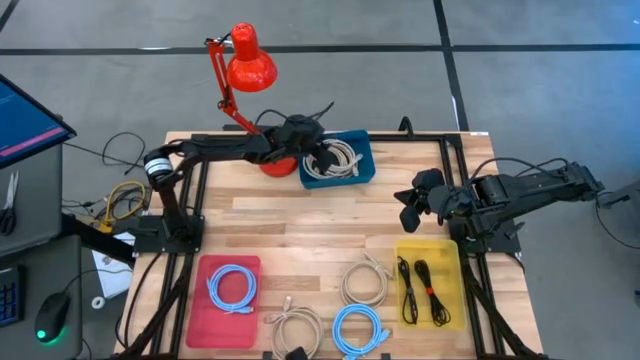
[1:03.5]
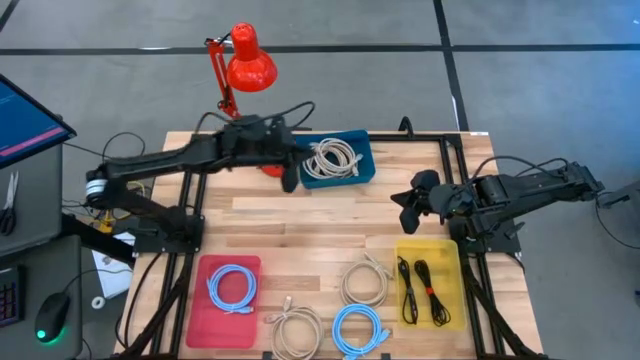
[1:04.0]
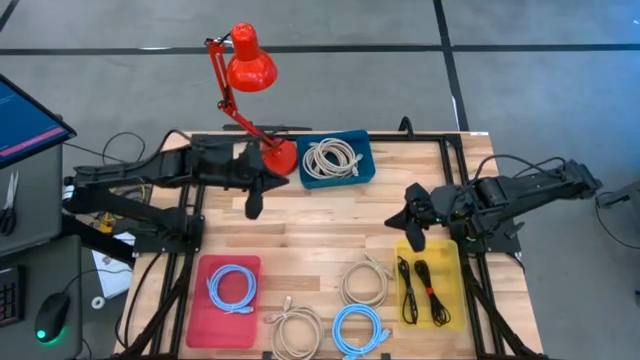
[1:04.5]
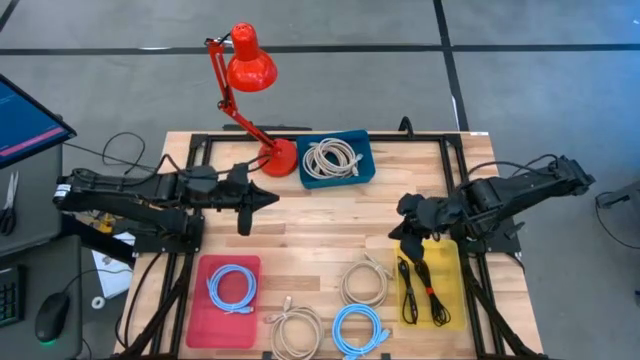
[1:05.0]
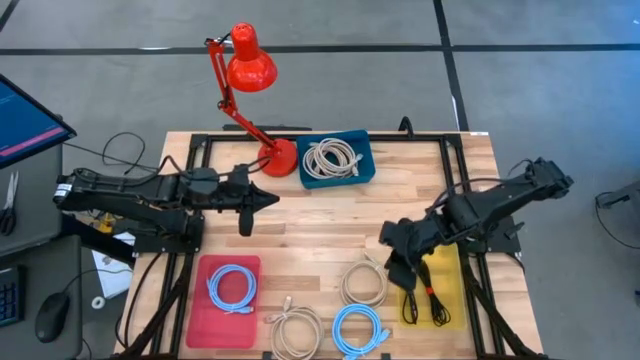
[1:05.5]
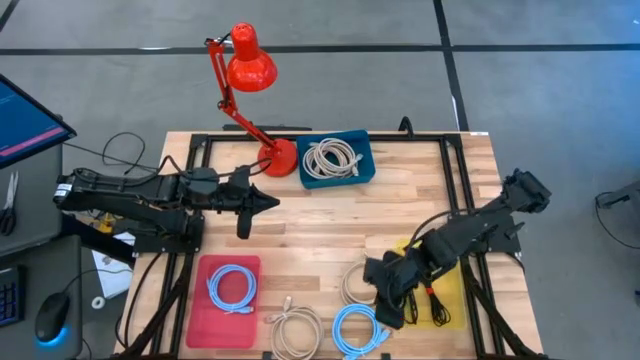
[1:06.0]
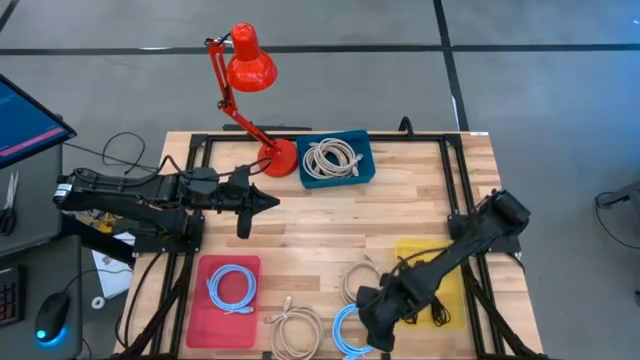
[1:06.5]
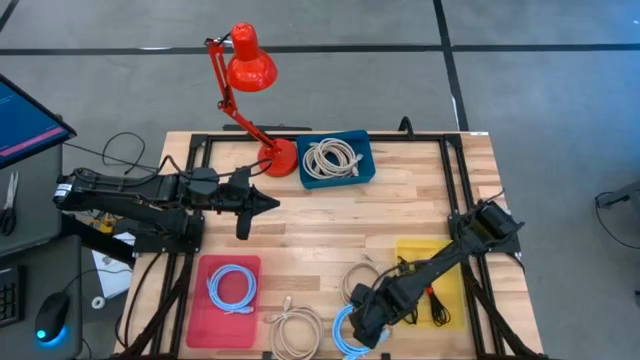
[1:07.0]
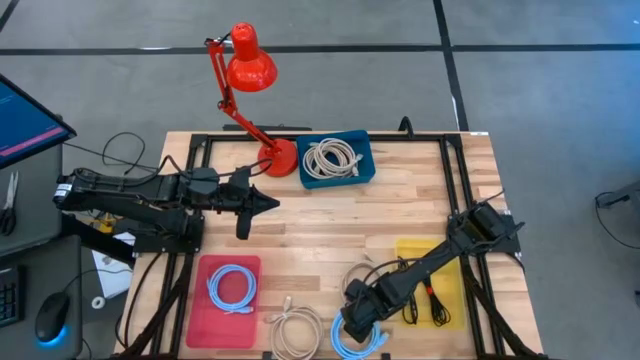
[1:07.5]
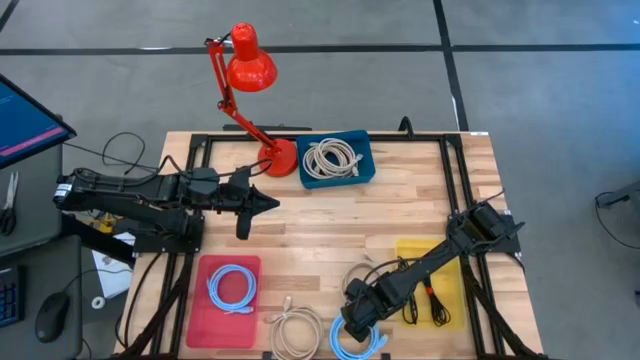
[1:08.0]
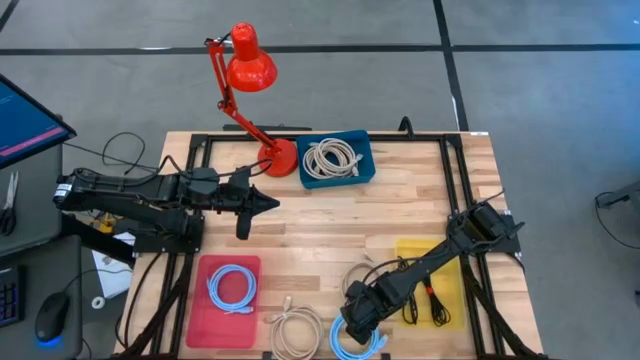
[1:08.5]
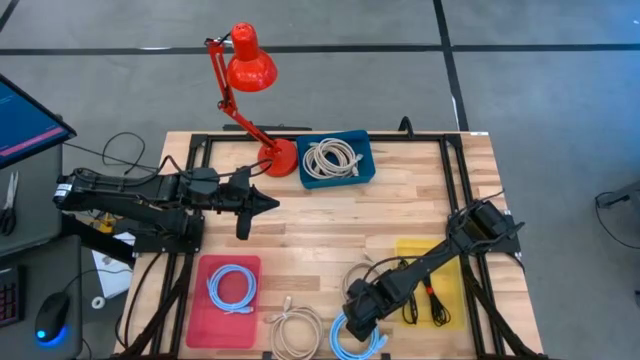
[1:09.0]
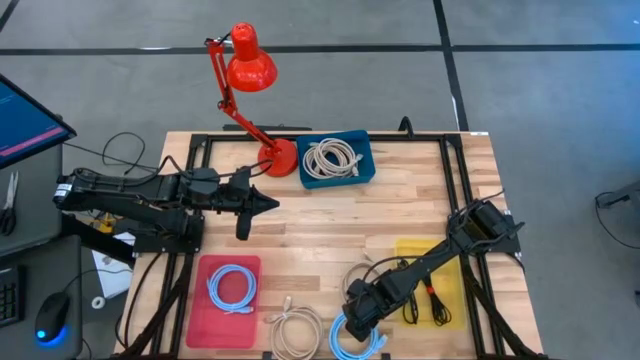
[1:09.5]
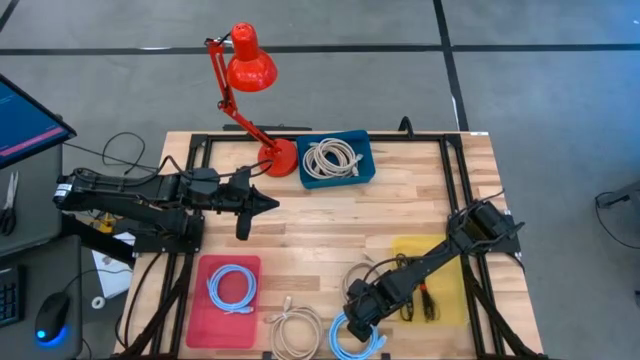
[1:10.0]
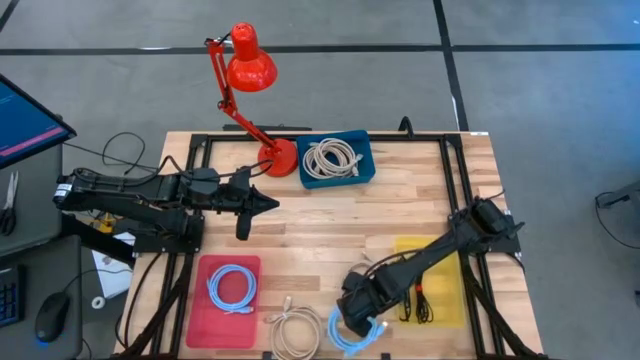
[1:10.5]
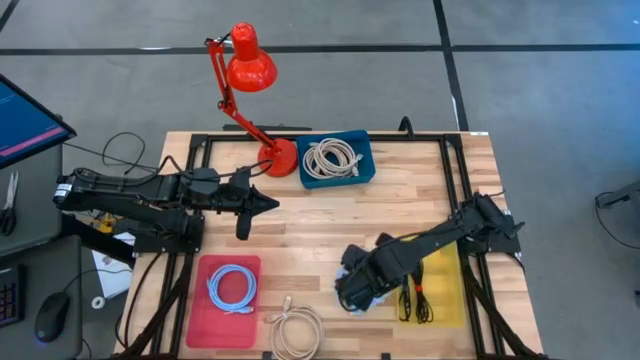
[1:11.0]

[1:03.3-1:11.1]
Task: Sort HDMI cables
Put the blue HDMI cable into the red bin

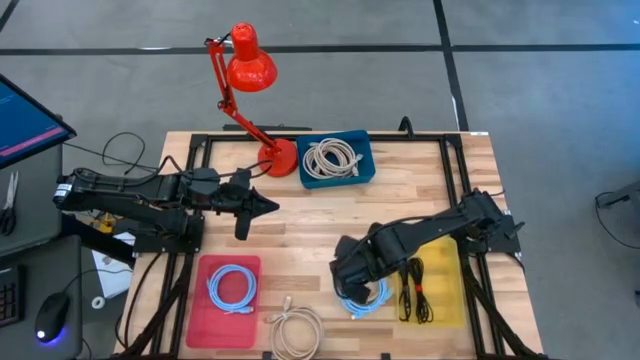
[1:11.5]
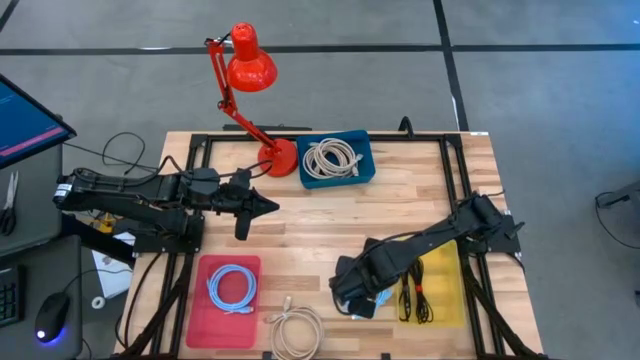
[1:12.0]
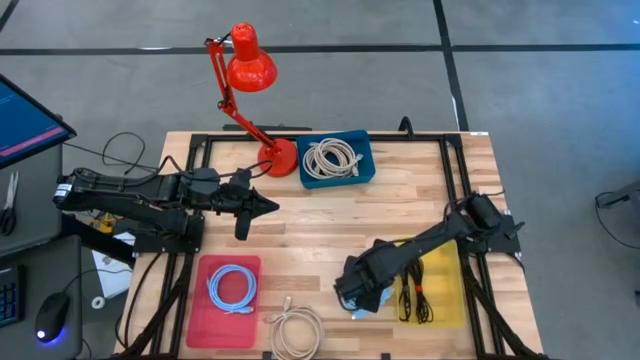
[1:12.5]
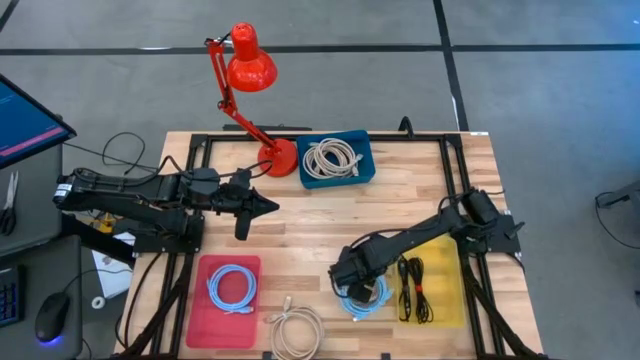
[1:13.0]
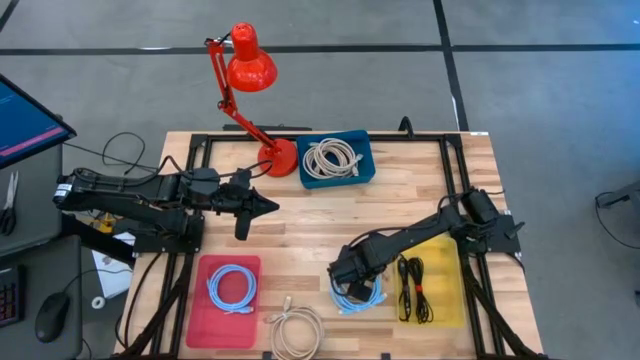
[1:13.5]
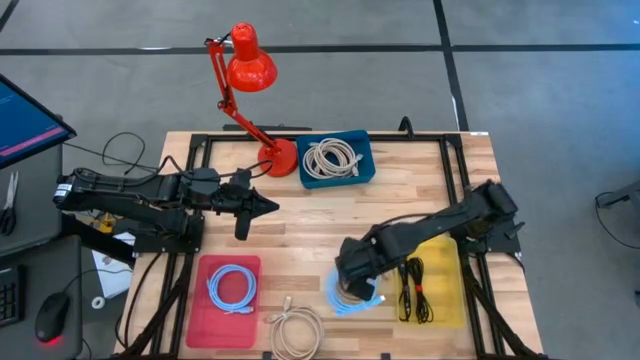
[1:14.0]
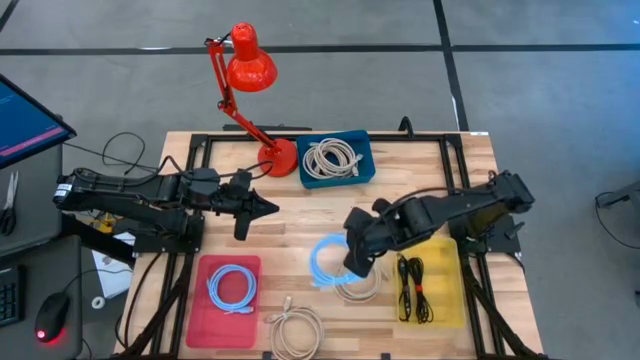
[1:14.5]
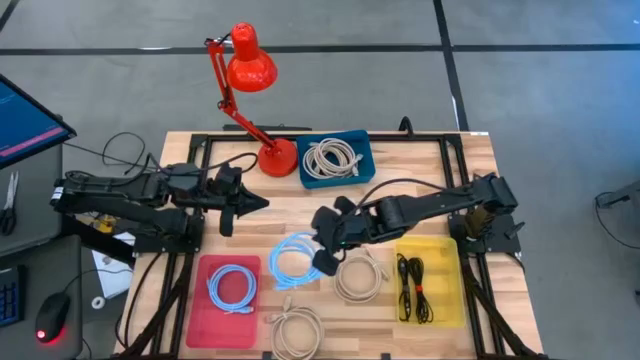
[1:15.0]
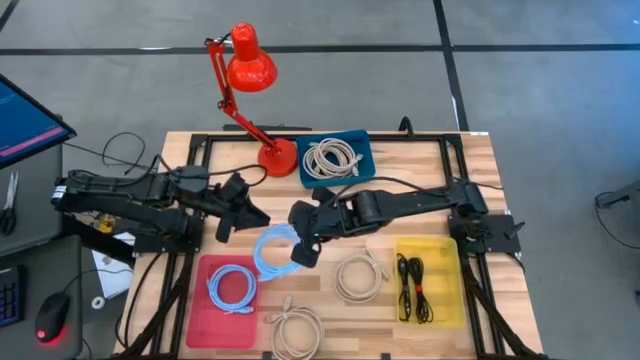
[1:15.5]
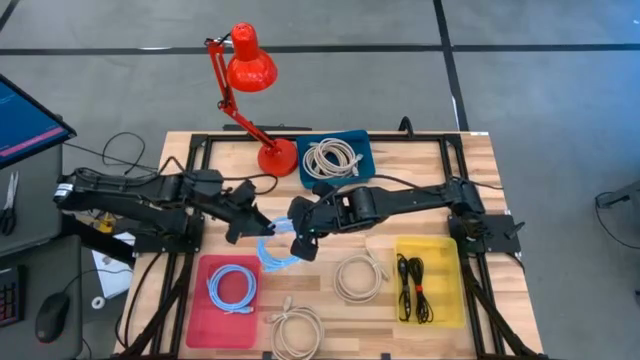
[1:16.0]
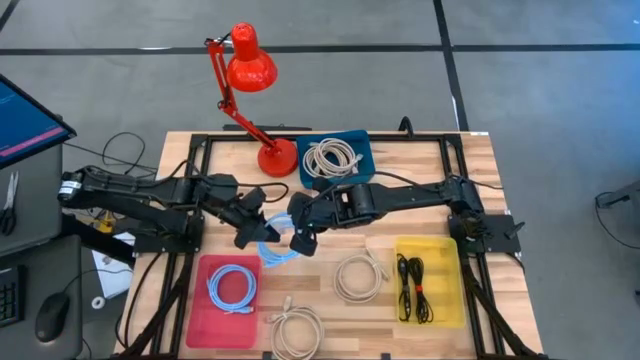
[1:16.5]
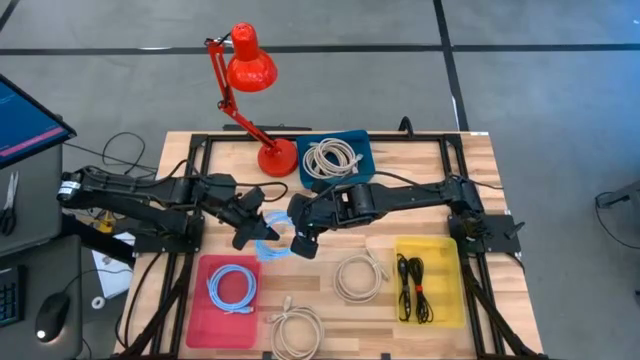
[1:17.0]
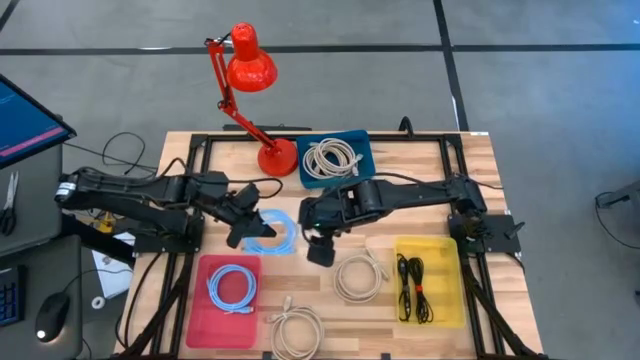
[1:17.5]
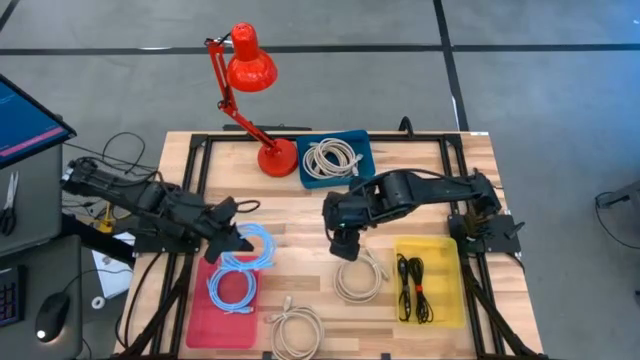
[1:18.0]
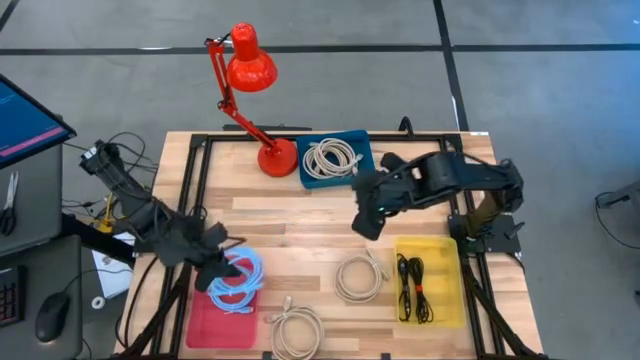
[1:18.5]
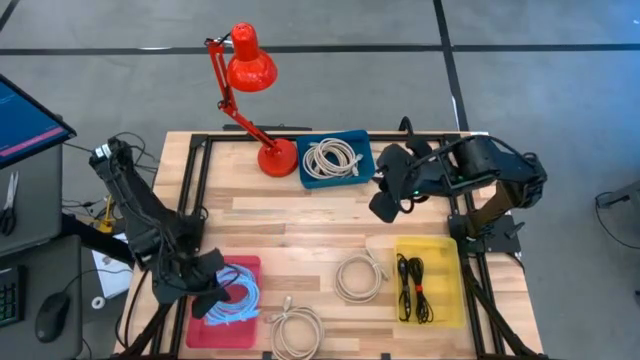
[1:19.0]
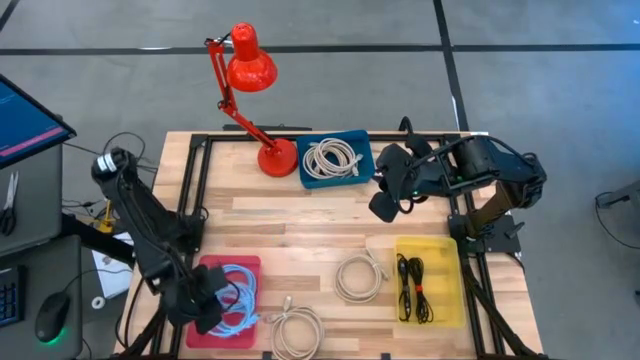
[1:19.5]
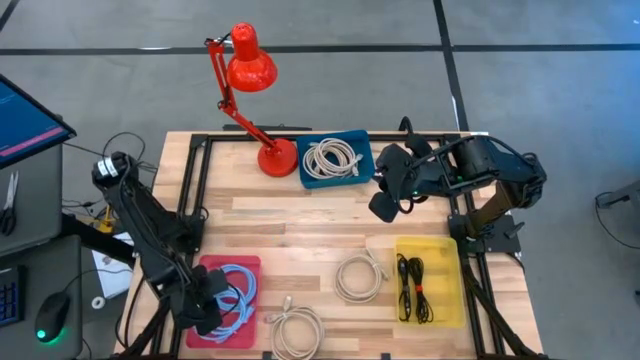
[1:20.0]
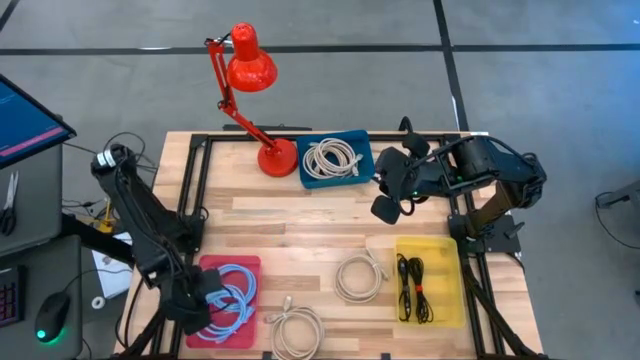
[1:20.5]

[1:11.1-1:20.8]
Put the blue HDMI cable into the red bin

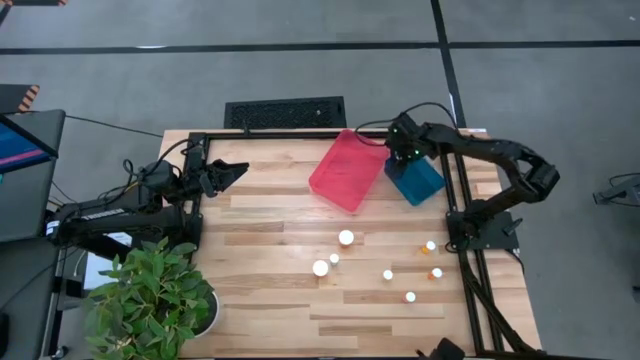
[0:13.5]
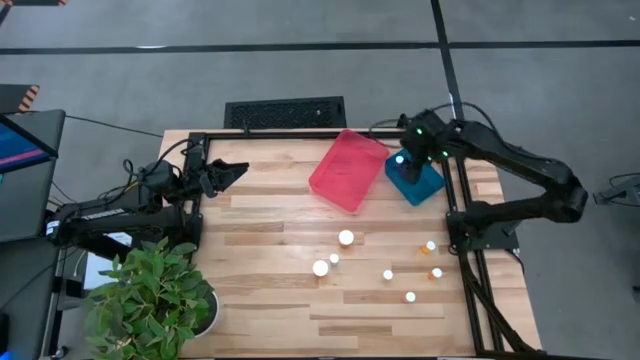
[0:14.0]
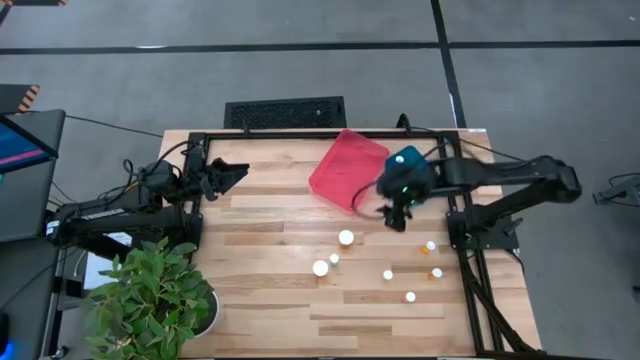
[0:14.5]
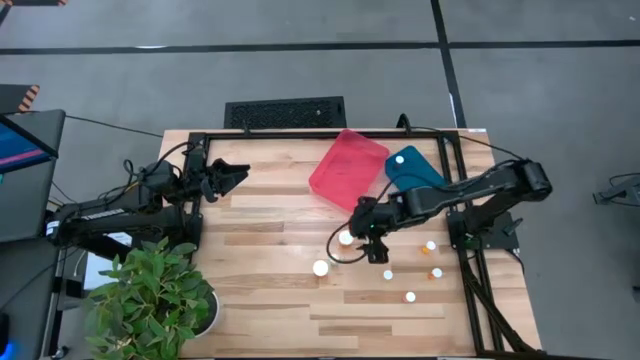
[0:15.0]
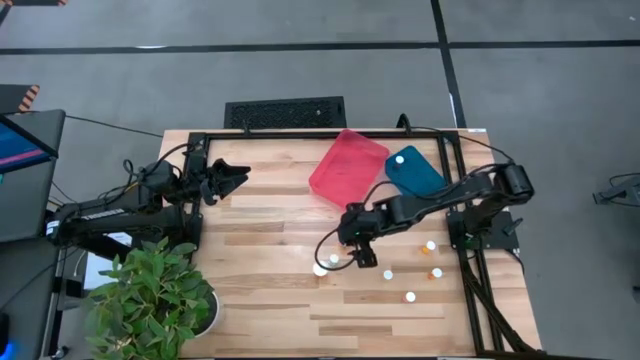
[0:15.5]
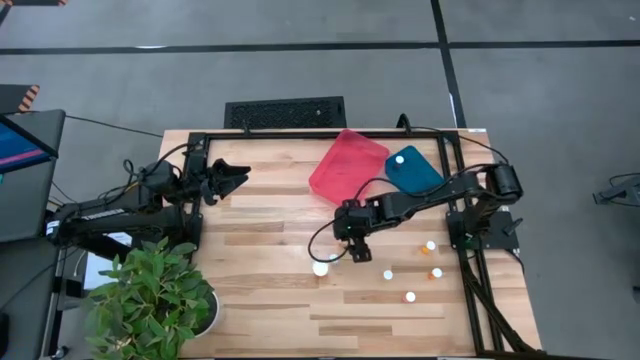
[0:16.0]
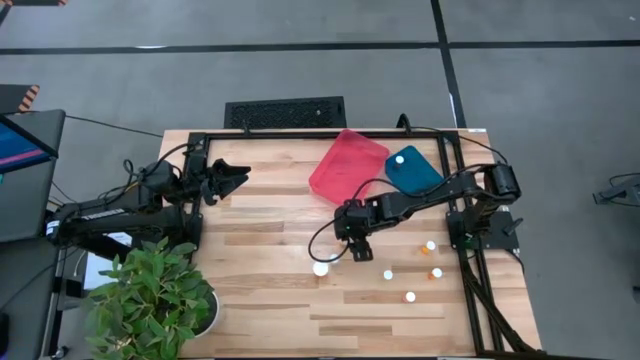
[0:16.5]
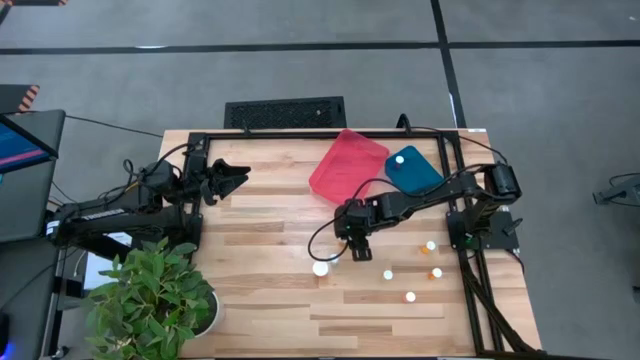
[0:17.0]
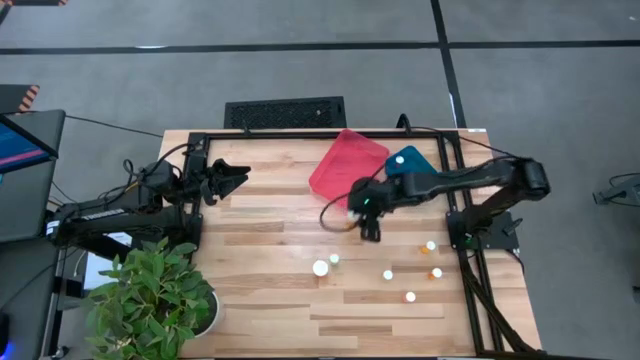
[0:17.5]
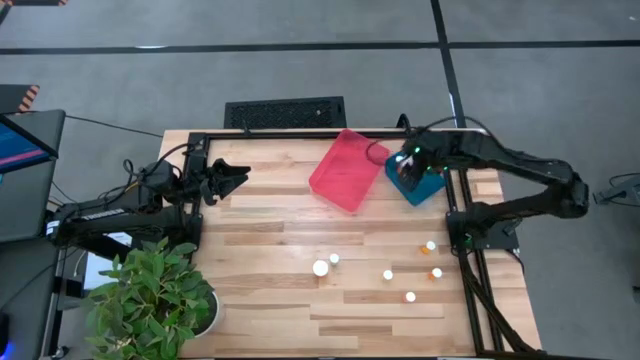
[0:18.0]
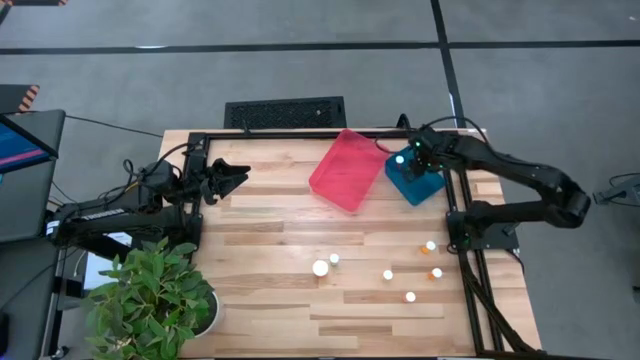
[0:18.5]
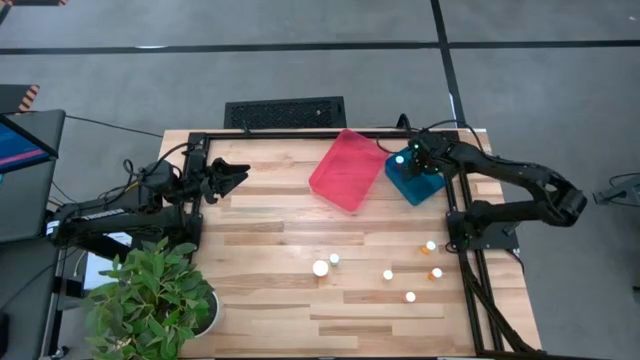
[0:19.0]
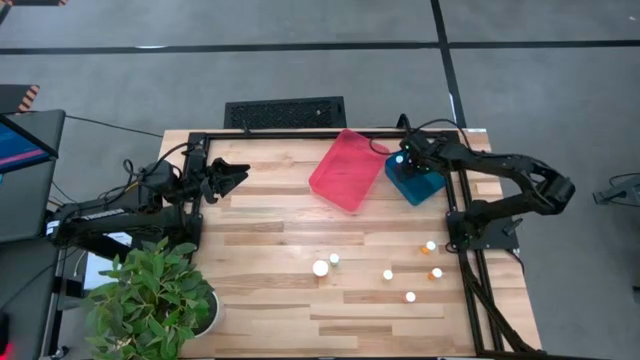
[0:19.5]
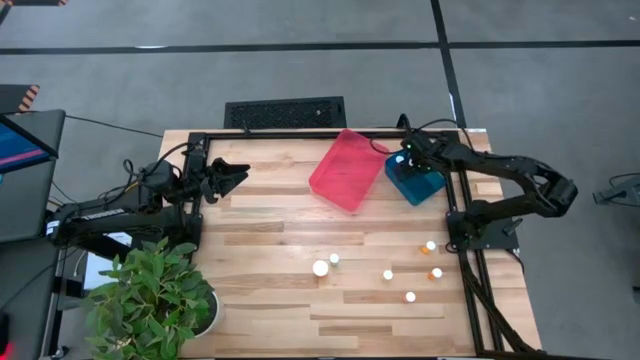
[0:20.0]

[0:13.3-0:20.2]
Task: Pick and place medicine bottles into bin by pill shape (circle, oval)
Put the top large orange capsule bottle into the blue bin
